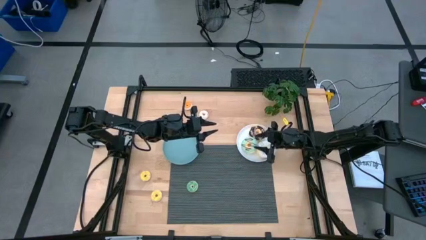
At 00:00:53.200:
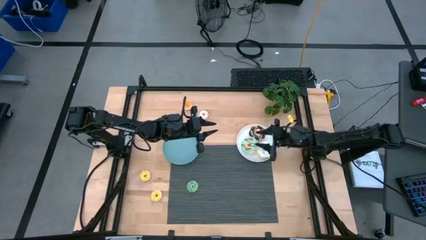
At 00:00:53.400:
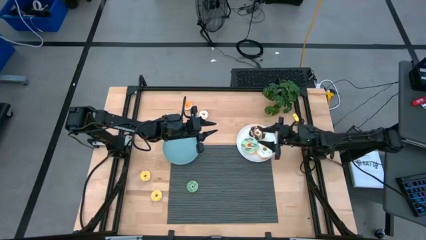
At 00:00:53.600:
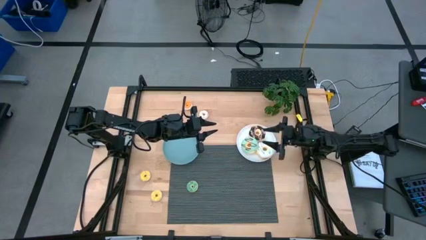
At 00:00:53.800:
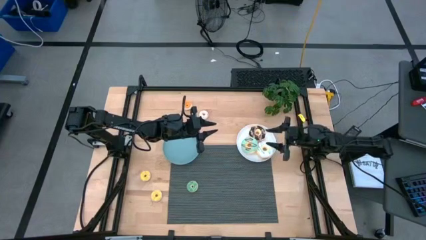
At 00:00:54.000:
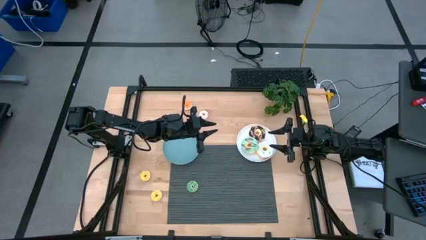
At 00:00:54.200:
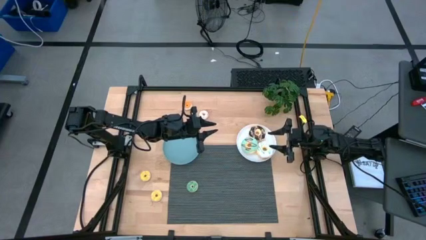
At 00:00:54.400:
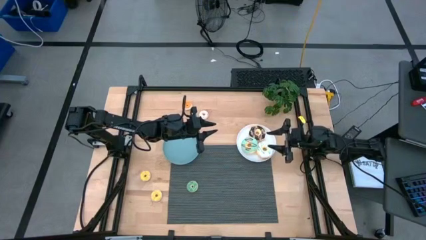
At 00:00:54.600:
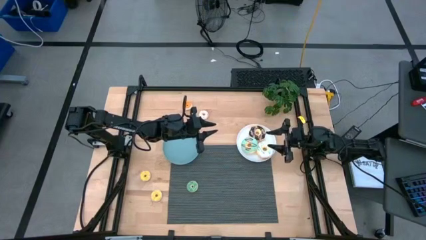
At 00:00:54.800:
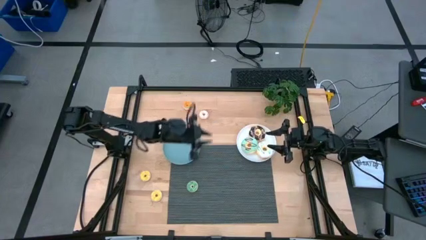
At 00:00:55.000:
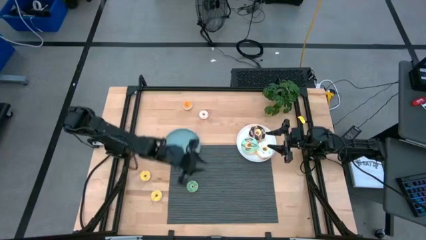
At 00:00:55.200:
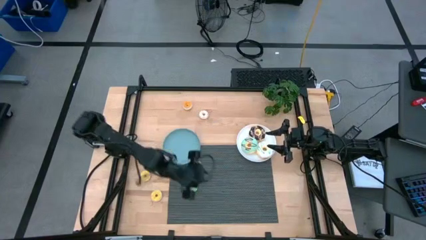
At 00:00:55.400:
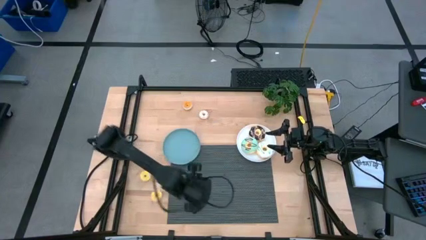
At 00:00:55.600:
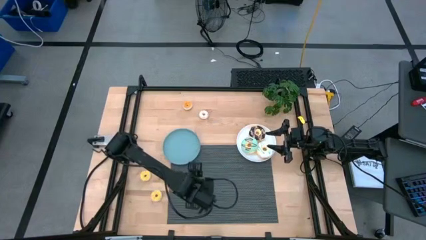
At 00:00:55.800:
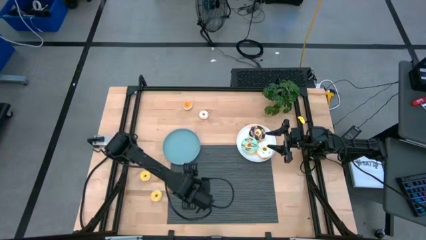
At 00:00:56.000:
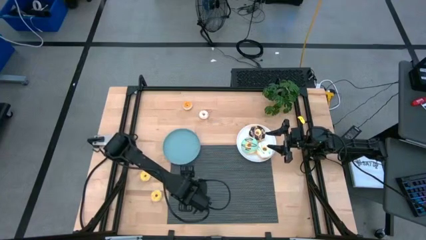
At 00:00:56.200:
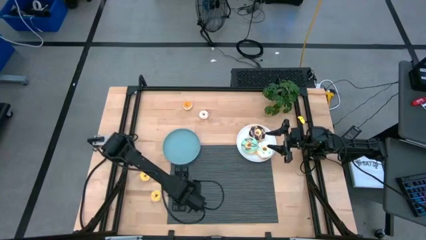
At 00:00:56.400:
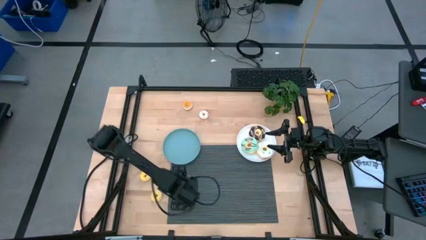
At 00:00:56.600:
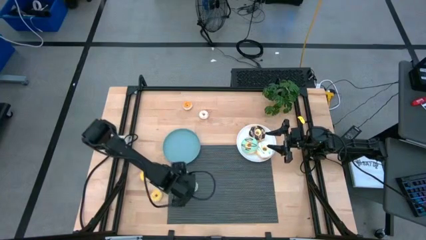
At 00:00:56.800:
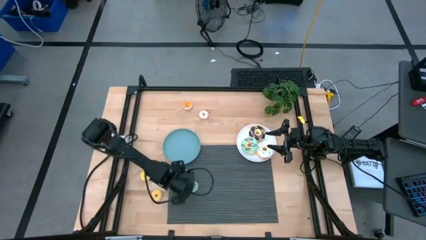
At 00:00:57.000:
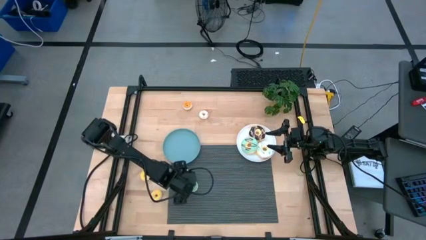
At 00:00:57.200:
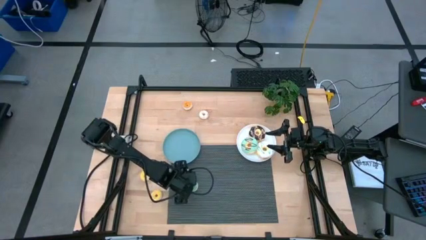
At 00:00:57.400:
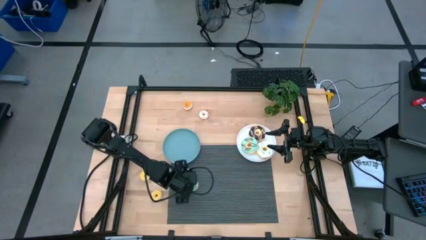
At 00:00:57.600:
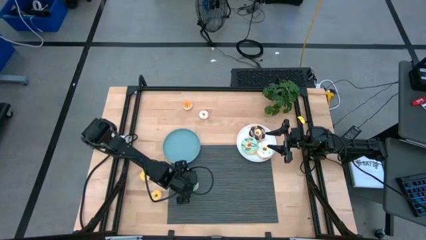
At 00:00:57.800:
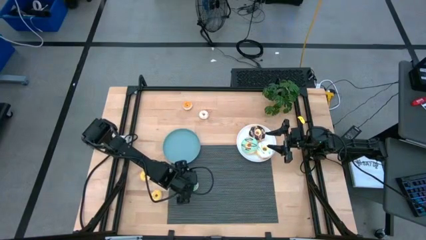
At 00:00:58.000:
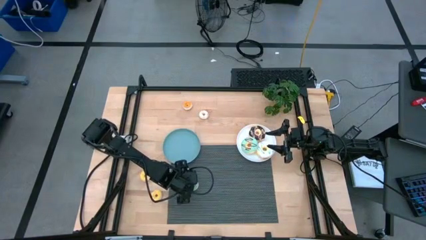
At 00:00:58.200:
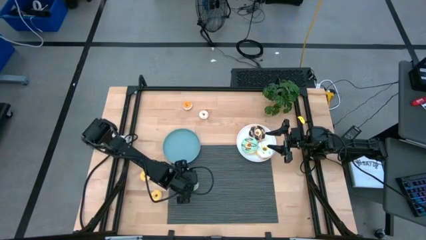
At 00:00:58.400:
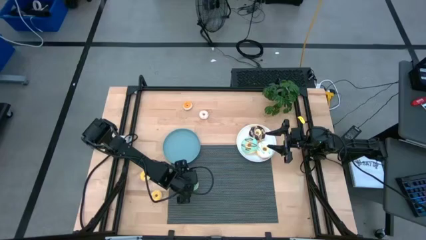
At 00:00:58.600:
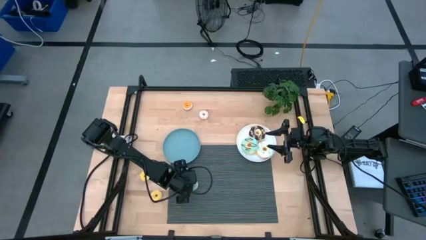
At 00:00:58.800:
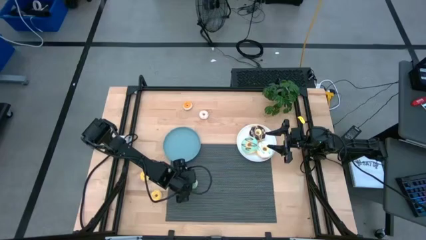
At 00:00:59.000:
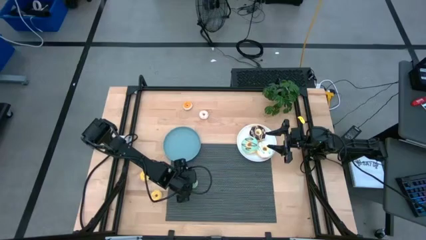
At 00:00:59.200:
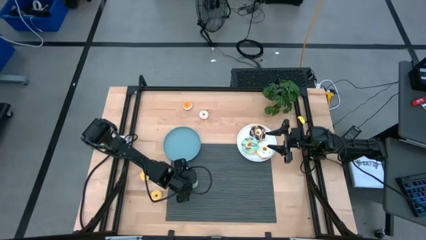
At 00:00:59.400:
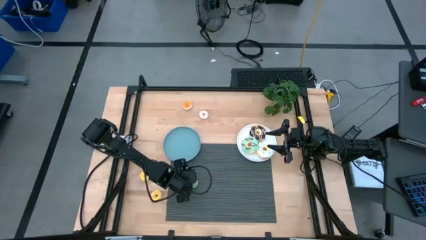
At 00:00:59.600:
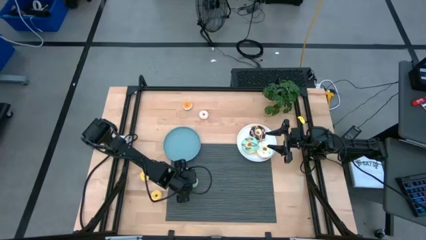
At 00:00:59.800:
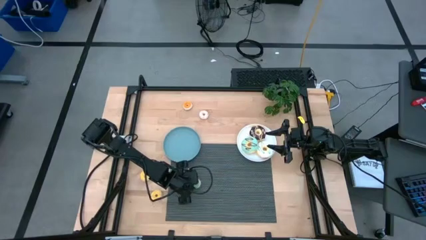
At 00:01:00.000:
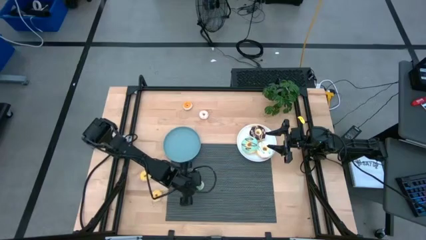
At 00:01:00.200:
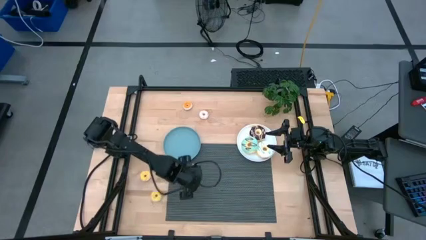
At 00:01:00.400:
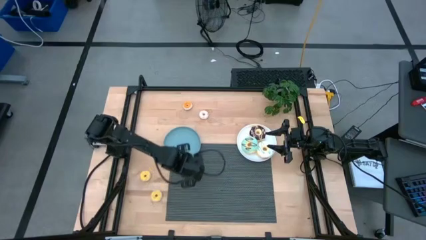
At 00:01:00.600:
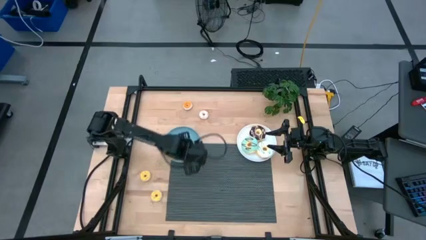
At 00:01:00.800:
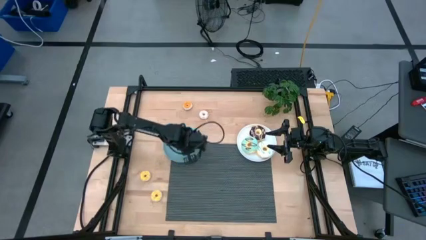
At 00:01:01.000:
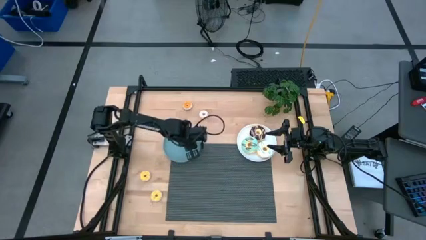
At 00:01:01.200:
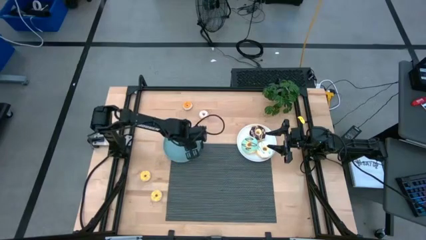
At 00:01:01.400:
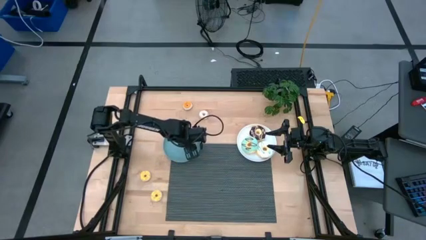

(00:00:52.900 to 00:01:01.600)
Task: Pick & Place donuts
Put the small green donut on the blue plate

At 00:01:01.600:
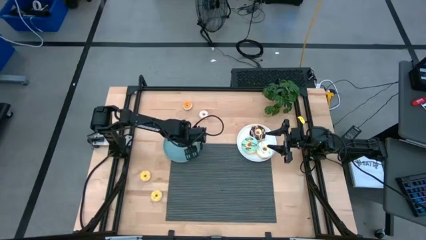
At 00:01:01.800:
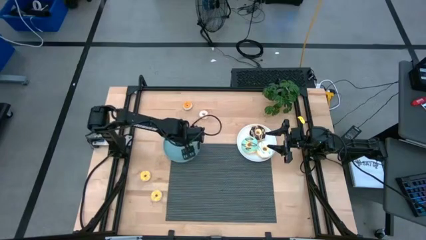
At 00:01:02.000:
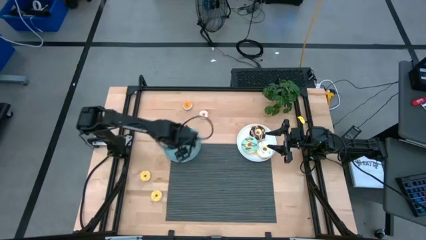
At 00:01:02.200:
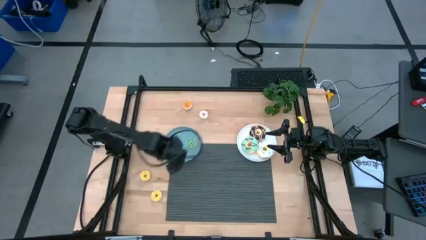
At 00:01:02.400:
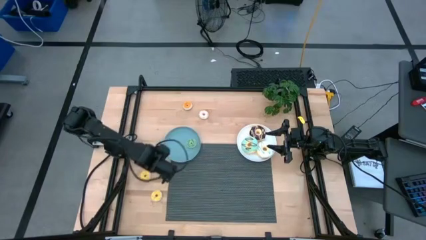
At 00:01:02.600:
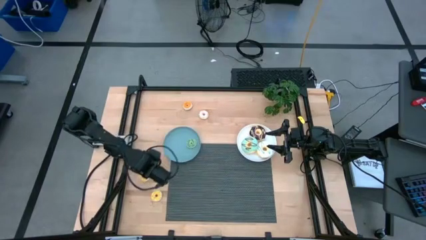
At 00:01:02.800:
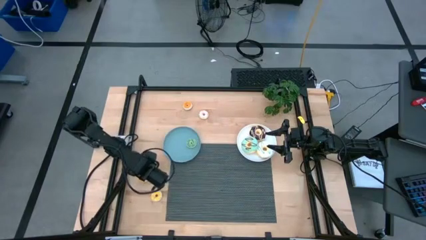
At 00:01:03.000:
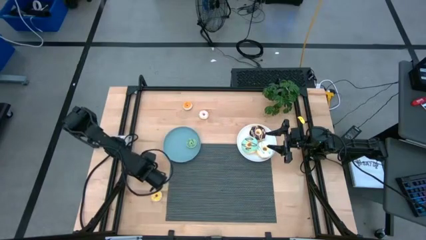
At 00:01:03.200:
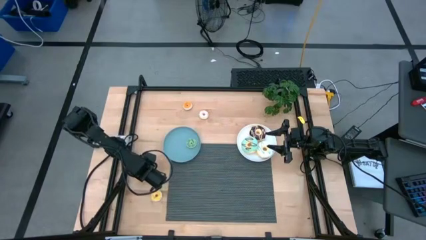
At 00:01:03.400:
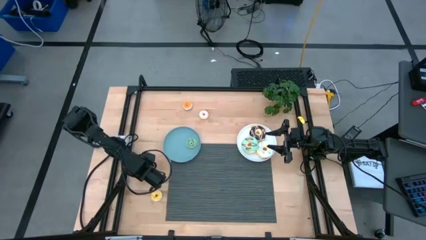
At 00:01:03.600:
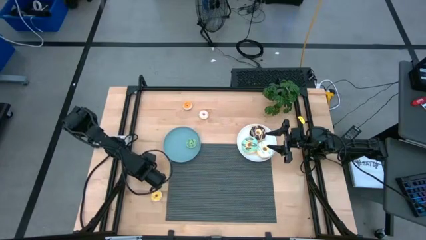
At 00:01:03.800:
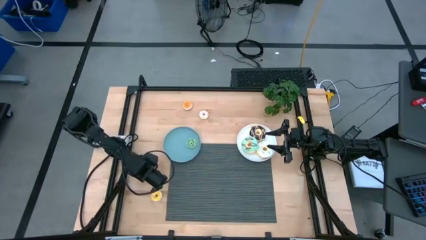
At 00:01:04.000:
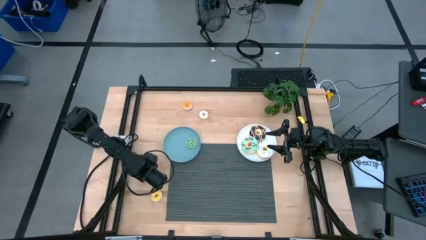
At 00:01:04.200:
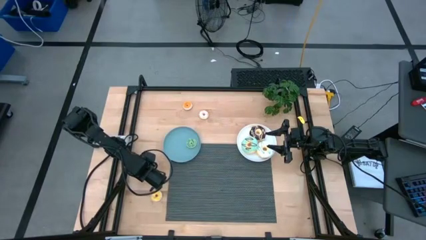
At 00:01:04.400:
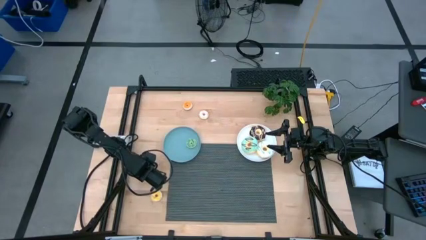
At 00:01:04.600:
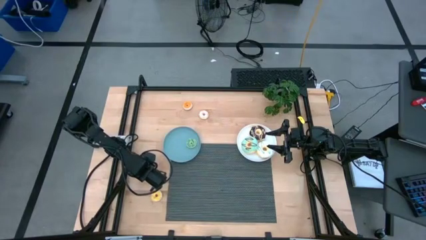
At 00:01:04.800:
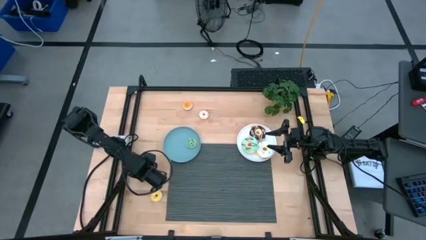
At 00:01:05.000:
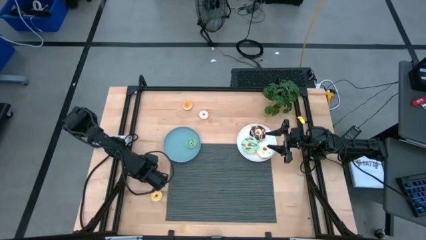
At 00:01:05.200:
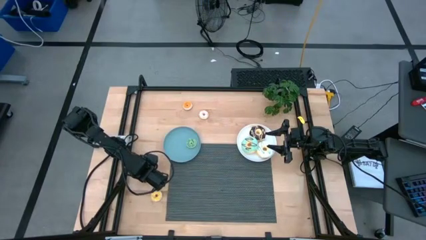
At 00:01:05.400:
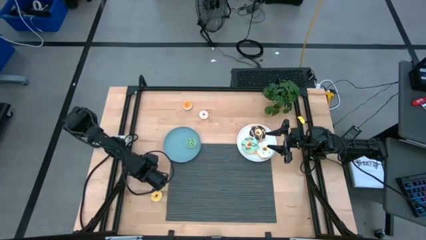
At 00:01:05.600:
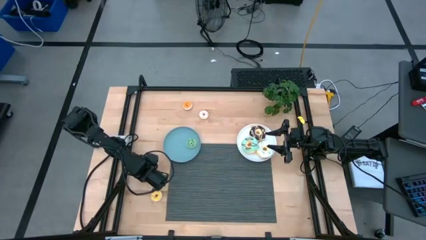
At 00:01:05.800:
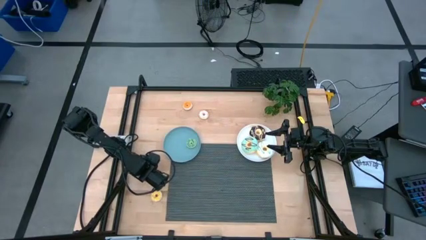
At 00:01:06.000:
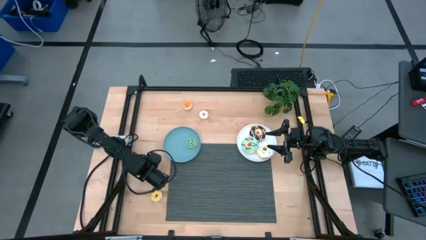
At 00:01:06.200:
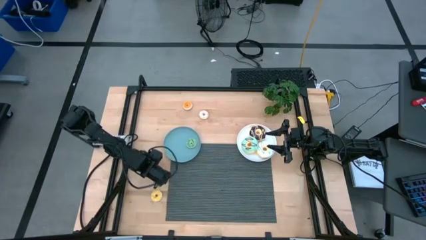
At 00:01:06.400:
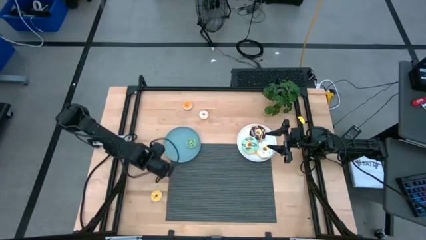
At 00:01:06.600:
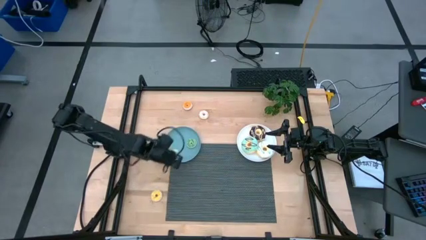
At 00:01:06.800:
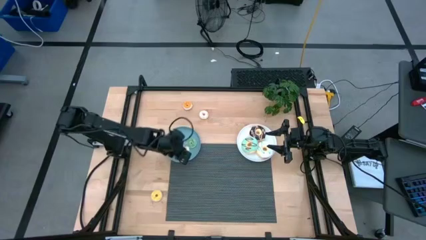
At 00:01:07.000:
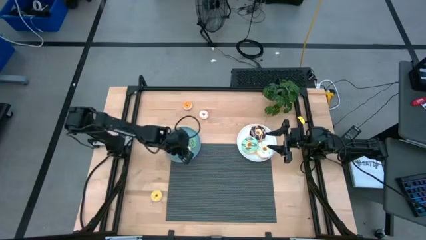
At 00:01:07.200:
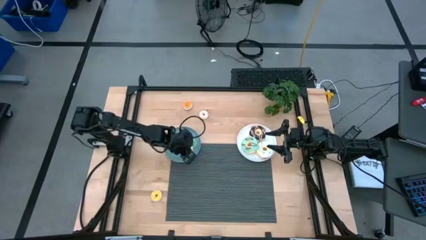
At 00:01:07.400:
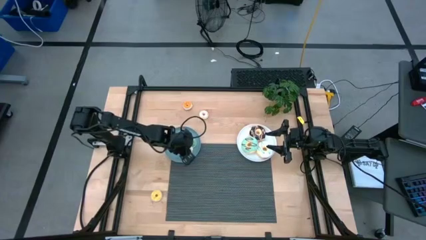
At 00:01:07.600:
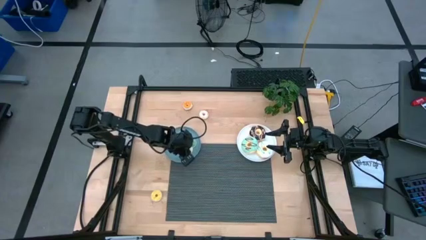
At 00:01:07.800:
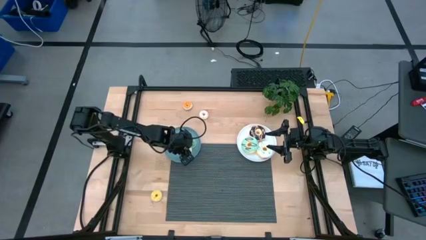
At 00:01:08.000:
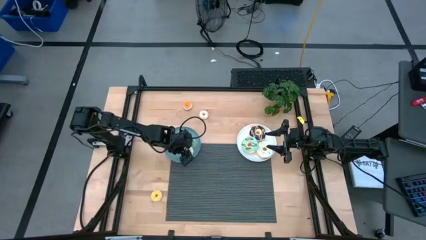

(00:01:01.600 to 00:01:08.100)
Put the top small yellow donut on the blue plate
